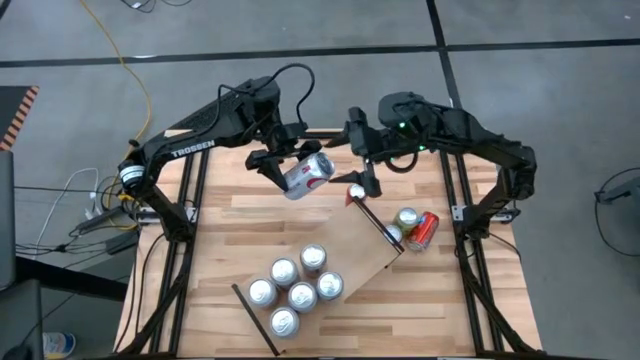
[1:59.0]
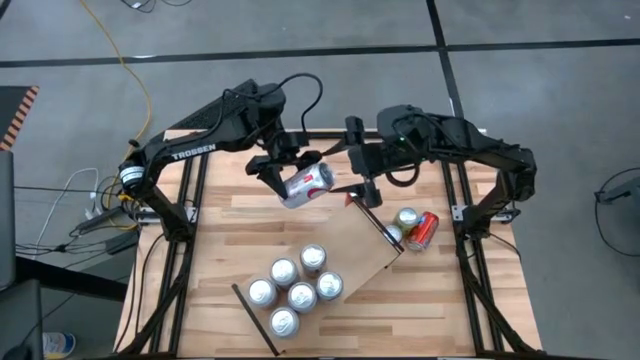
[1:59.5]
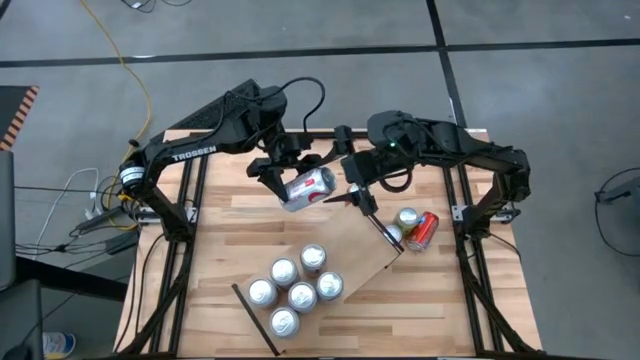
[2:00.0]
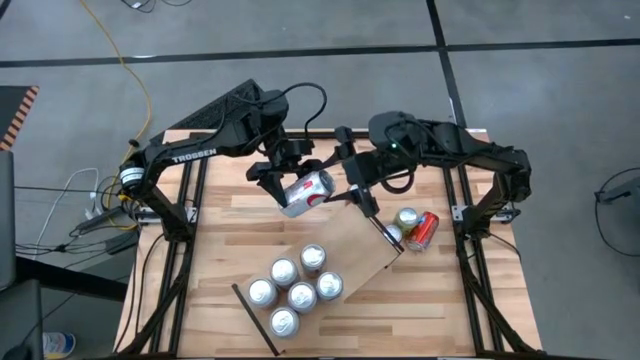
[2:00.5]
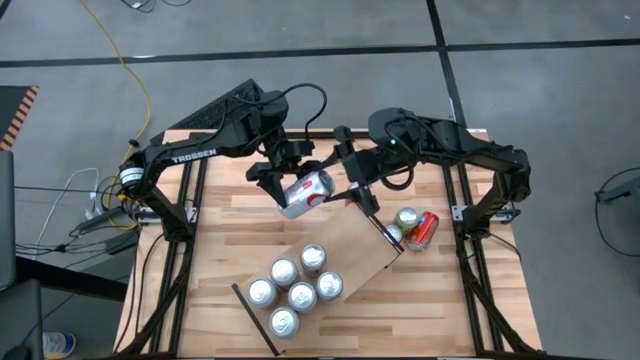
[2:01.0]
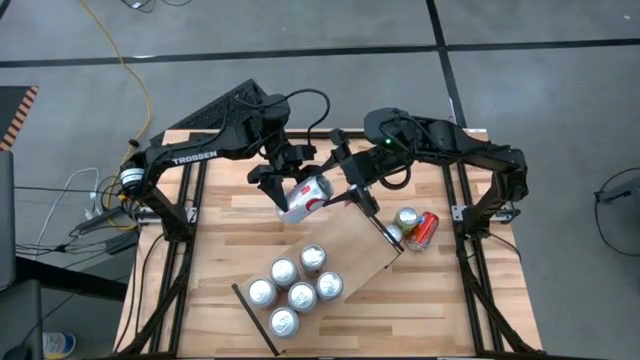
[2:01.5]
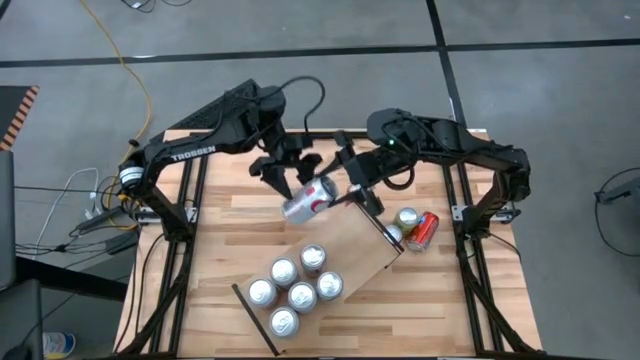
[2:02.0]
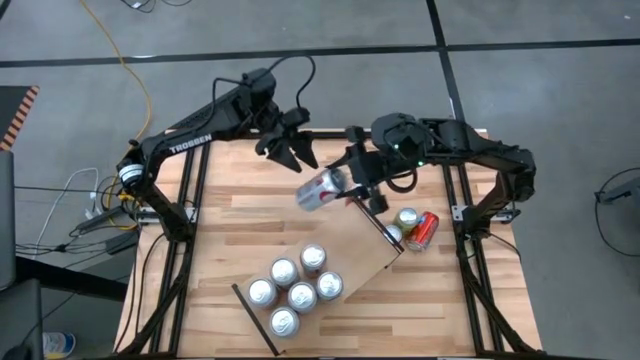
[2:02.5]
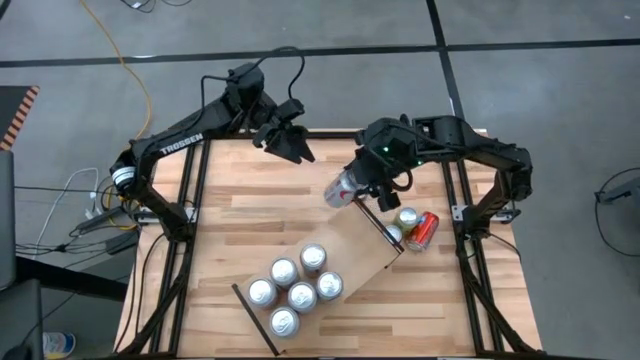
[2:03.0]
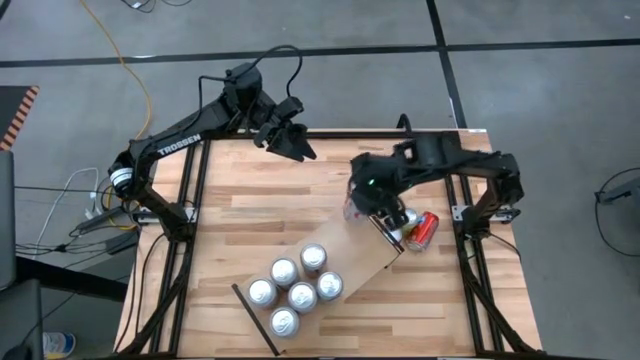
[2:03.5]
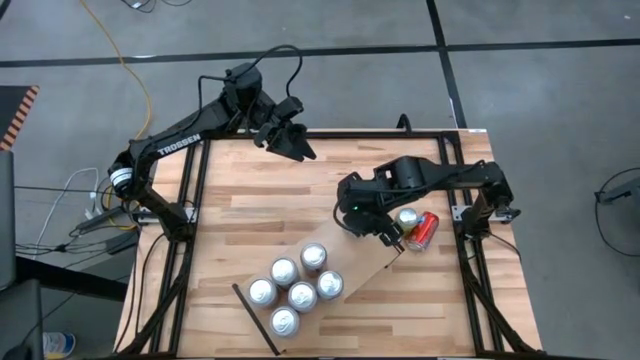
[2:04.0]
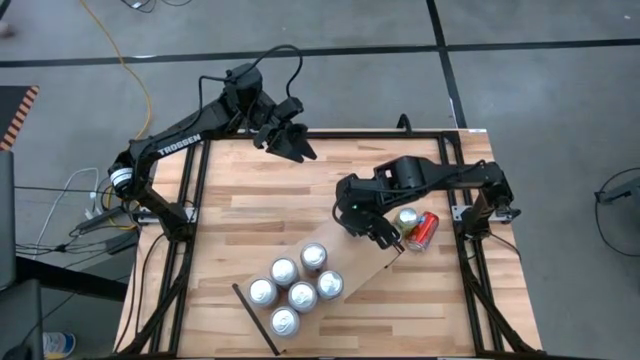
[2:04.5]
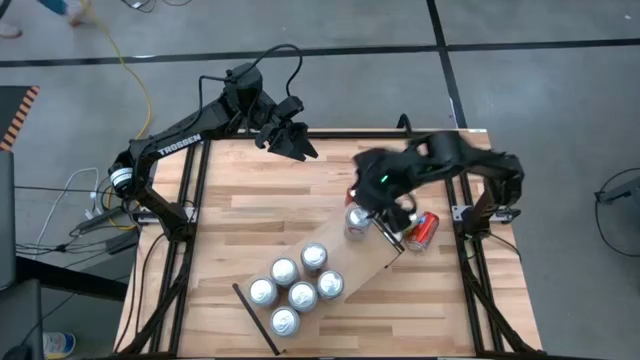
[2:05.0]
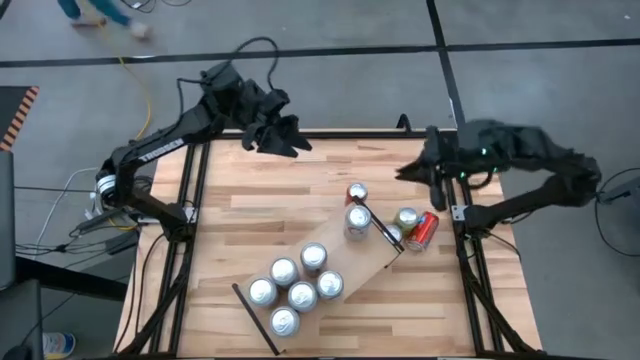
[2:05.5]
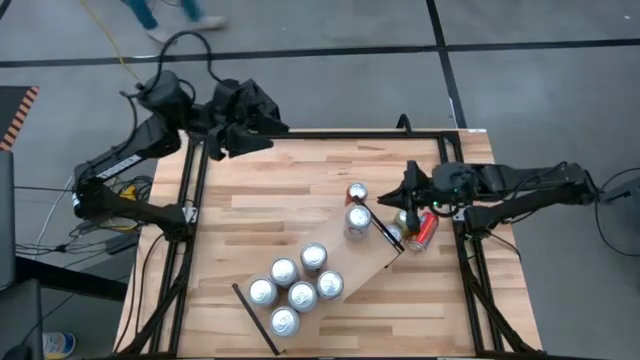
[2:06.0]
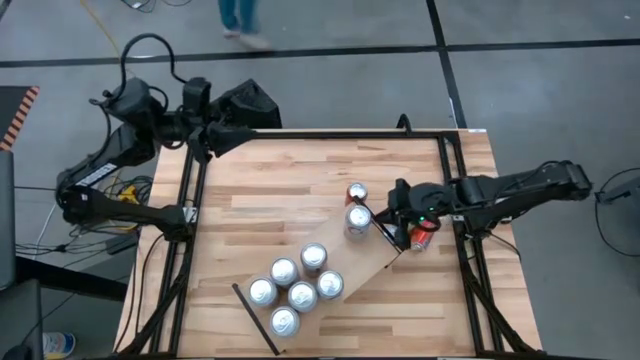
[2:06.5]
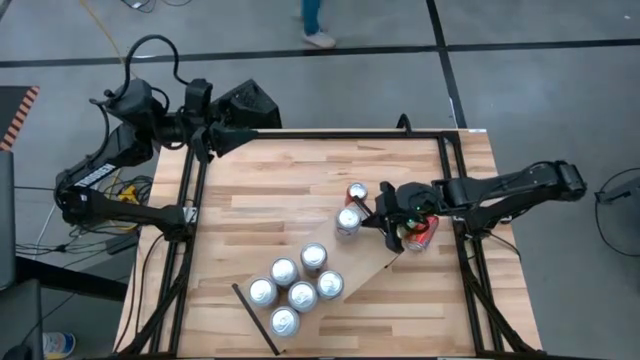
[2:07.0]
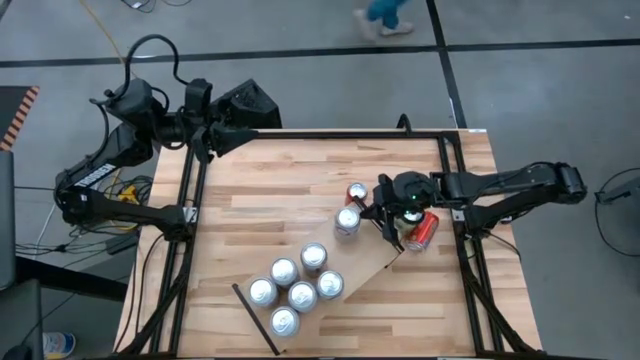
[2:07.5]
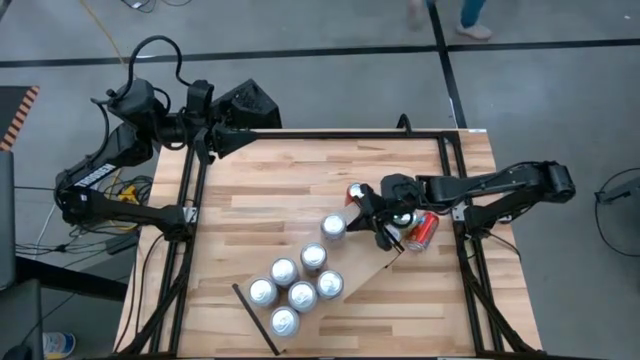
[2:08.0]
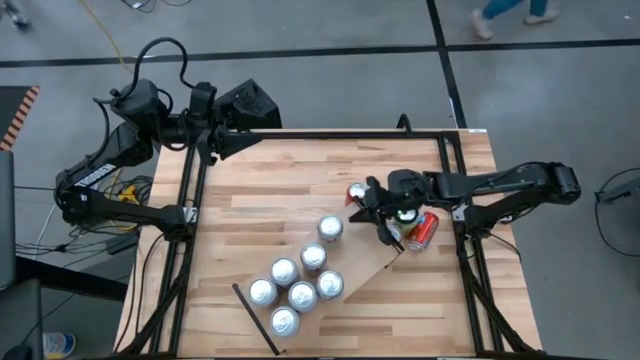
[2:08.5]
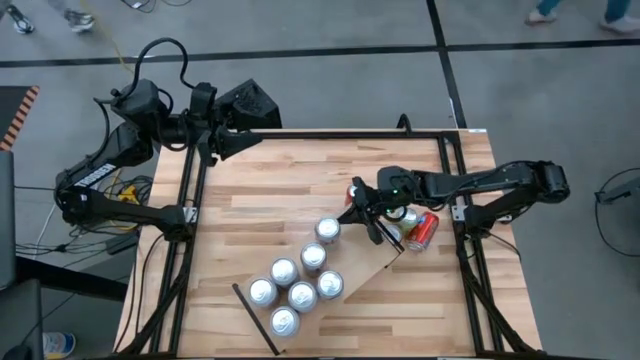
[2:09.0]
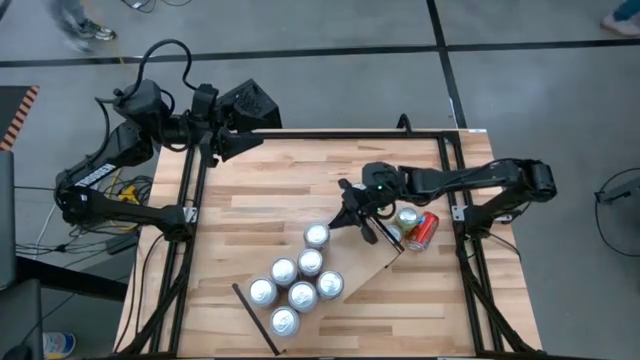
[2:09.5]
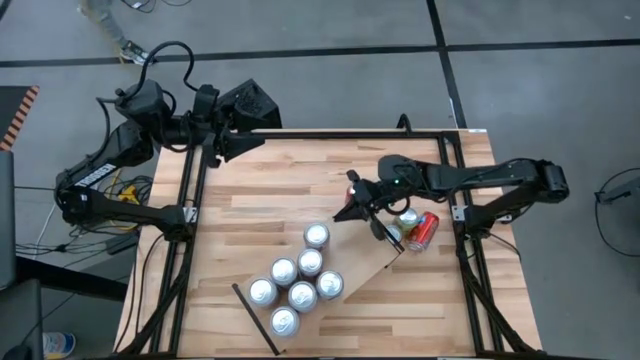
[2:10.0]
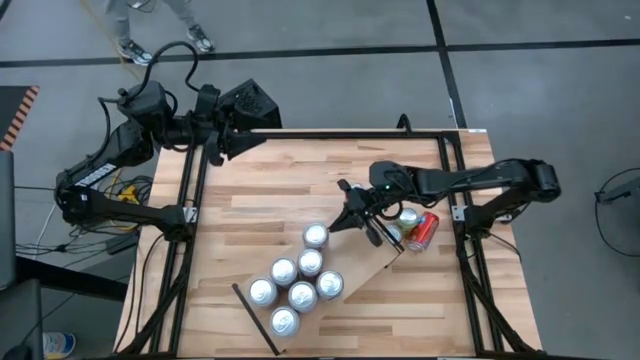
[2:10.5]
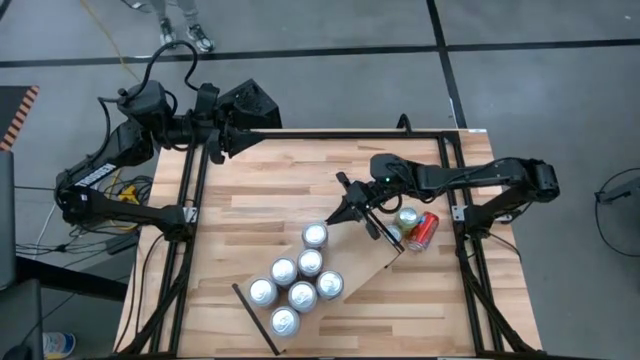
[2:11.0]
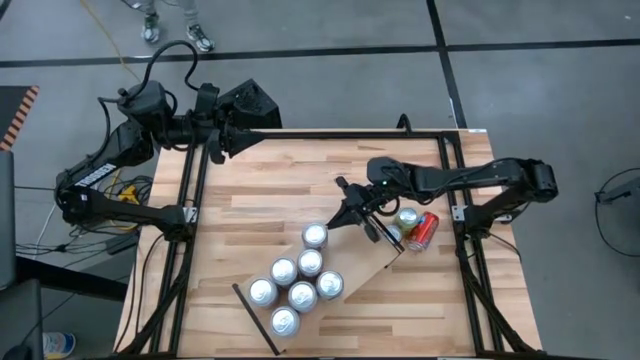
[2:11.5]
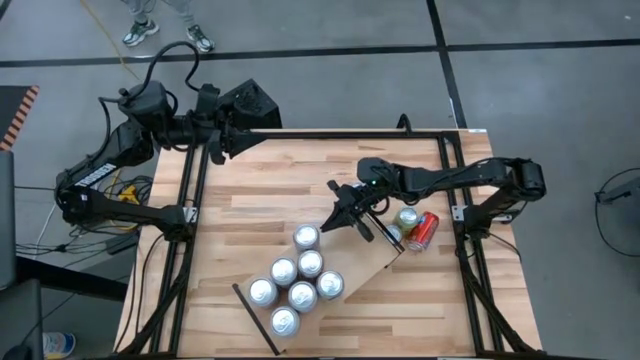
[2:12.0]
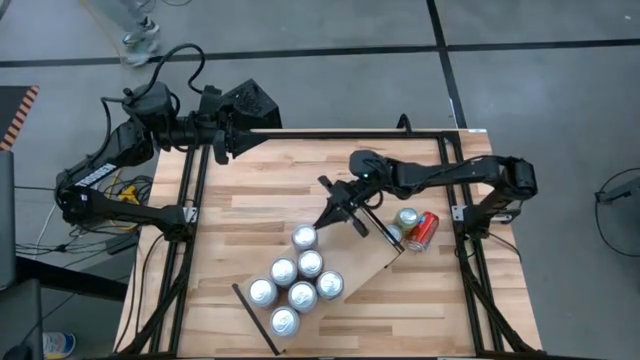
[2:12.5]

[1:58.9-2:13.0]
Task: Place canned beverage on shelf
Put the red silver soda can on the shelf aligned with the other red silver soda can

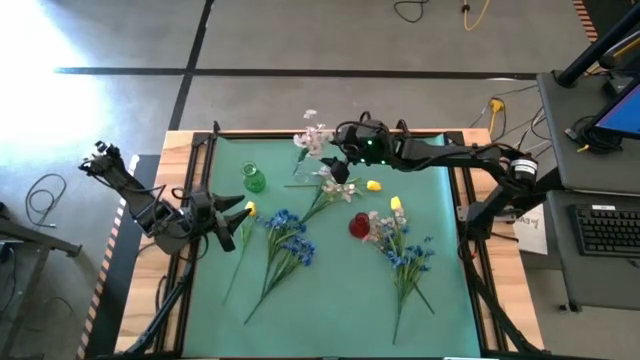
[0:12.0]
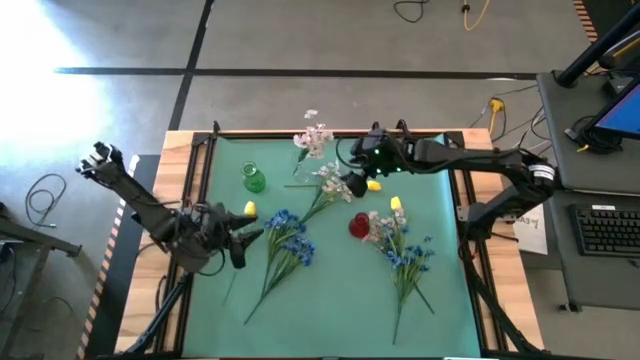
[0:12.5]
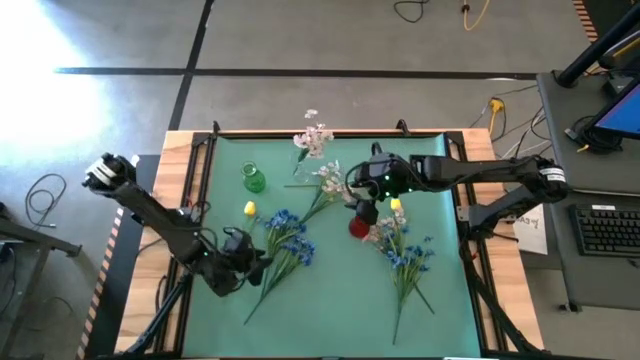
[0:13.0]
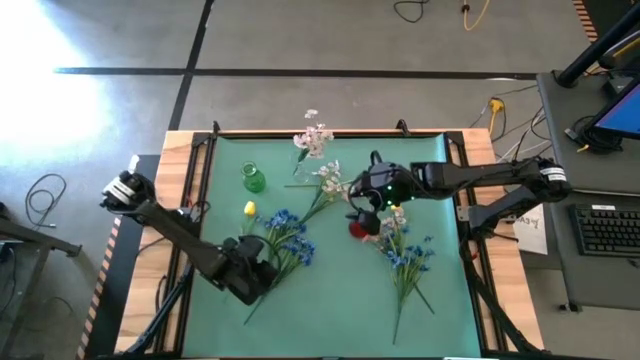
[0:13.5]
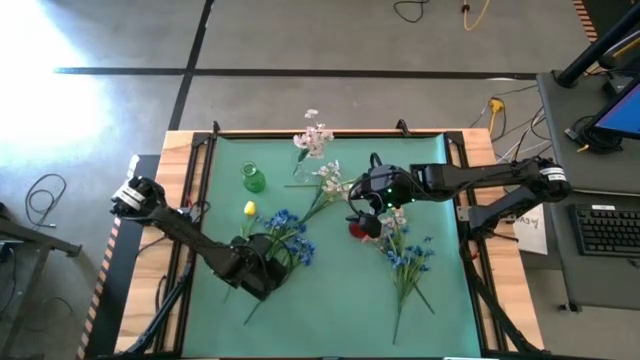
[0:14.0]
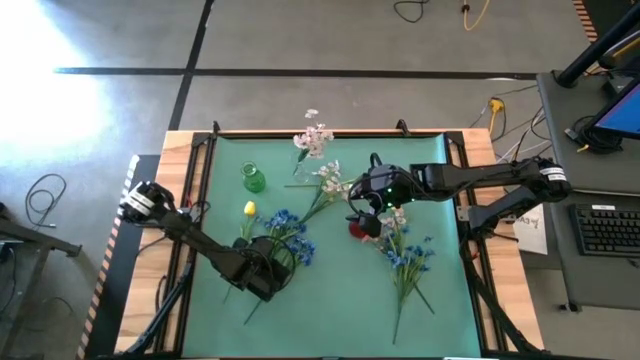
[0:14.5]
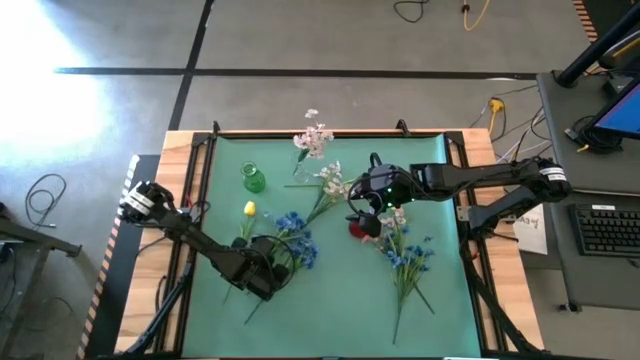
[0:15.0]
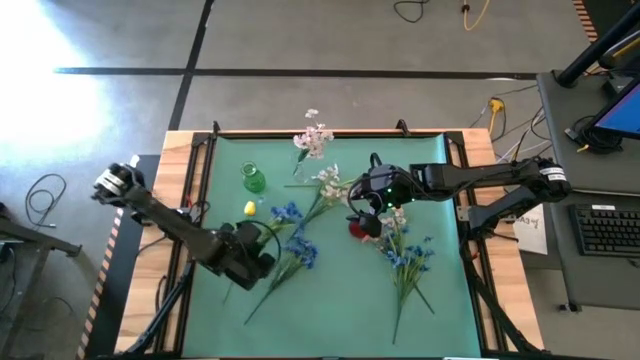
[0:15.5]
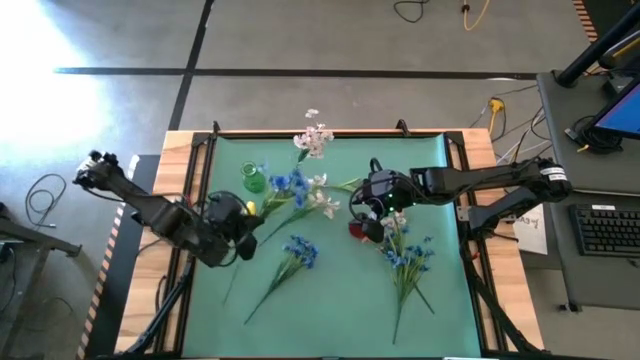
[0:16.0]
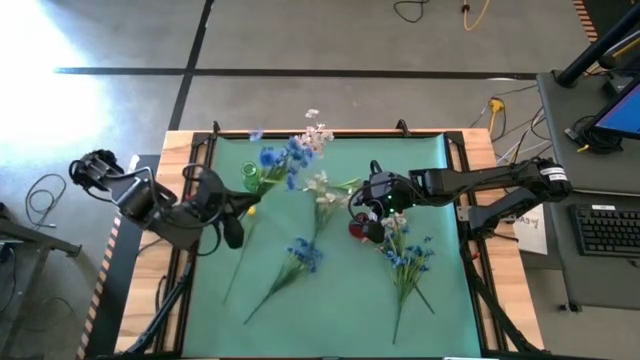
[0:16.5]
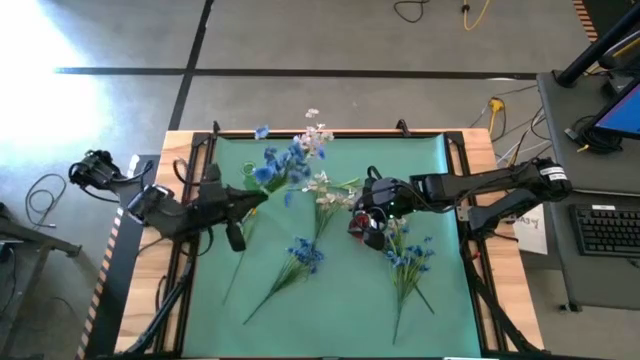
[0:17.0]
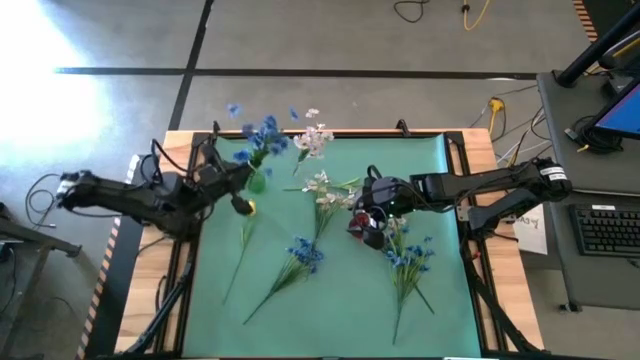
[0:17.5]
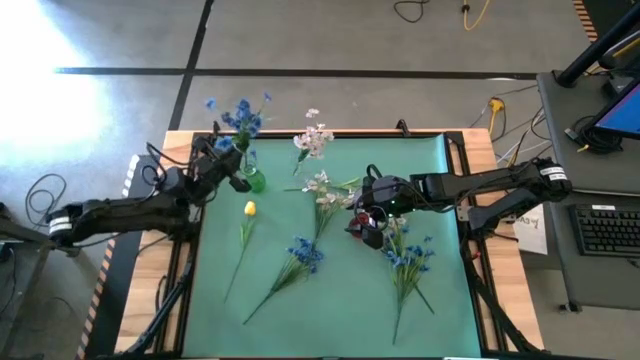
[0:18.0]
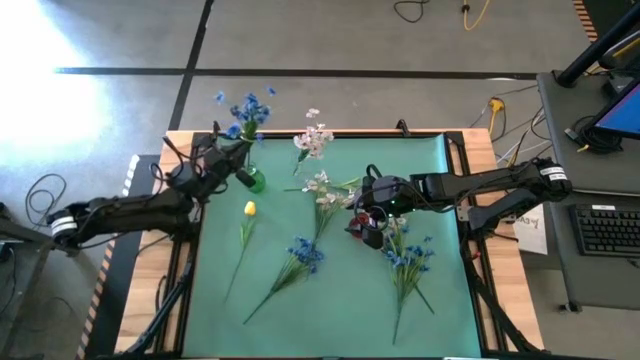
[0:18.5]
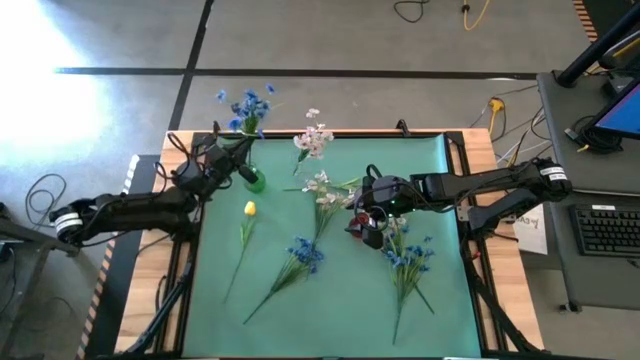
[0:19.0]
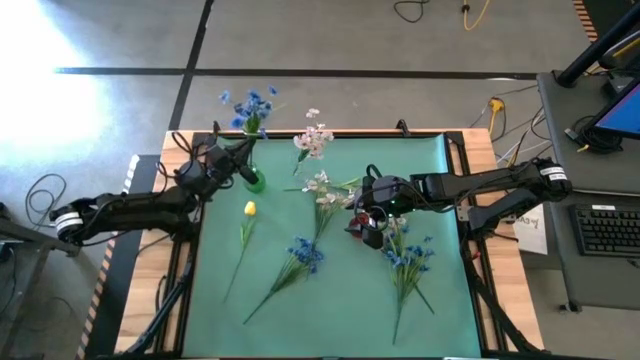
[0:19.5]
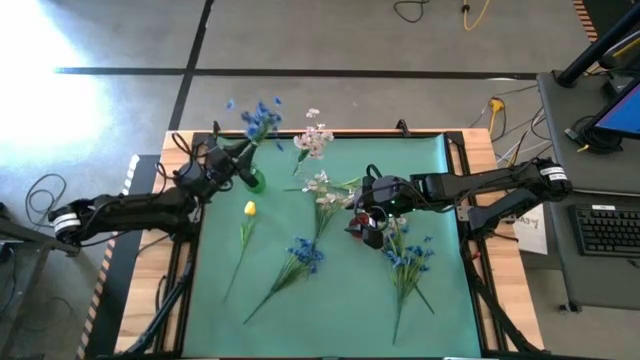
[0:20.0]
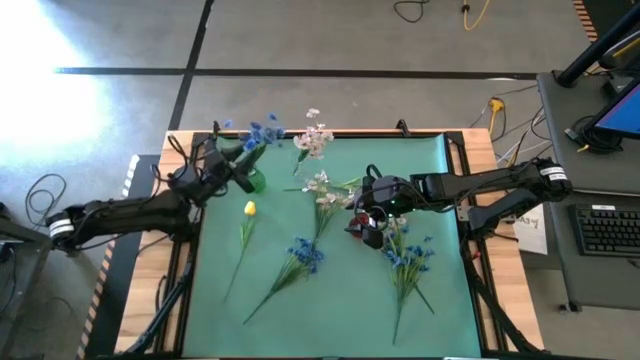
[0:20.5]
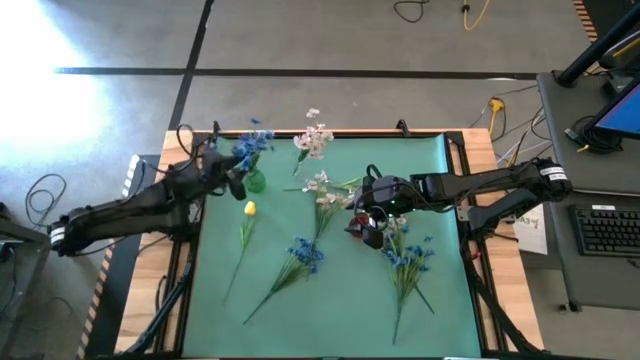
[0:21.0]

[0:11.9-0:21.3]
Task: Sort flowers into vase by color
Put the left blue flowers into the green vase
